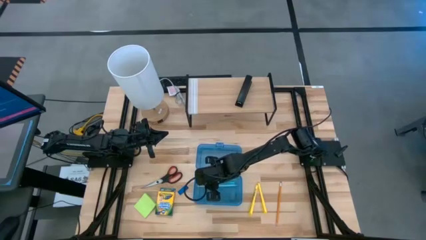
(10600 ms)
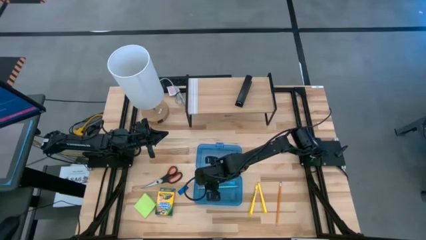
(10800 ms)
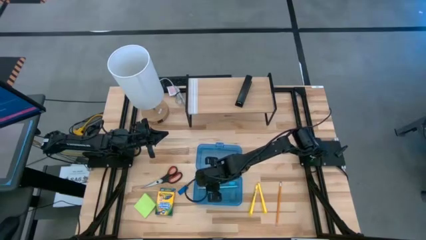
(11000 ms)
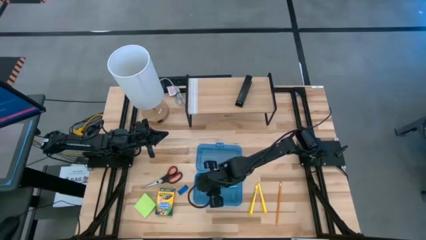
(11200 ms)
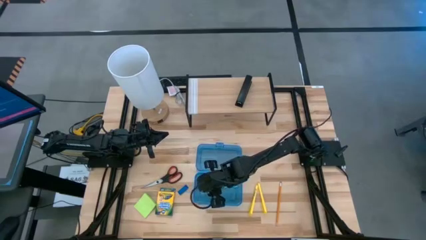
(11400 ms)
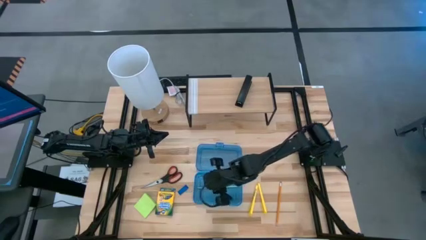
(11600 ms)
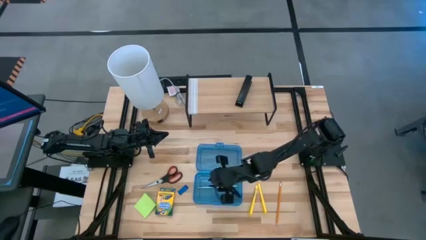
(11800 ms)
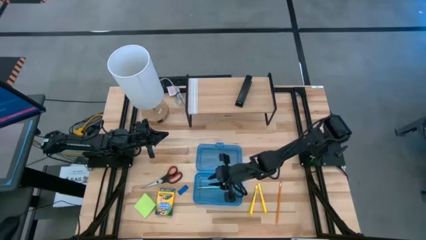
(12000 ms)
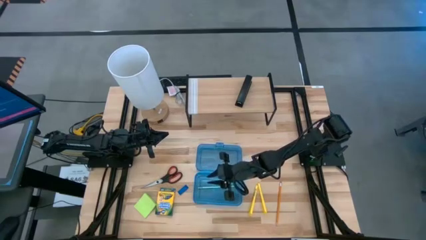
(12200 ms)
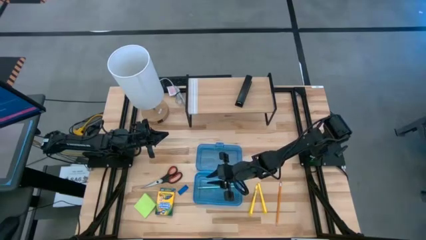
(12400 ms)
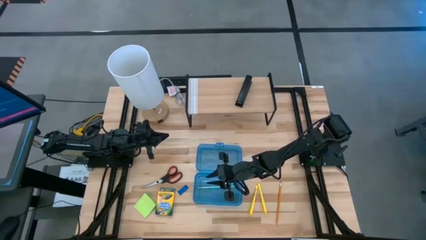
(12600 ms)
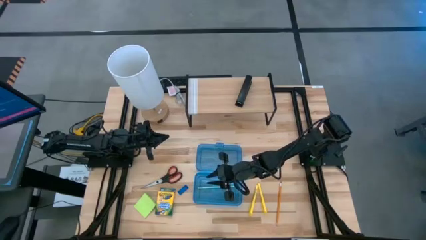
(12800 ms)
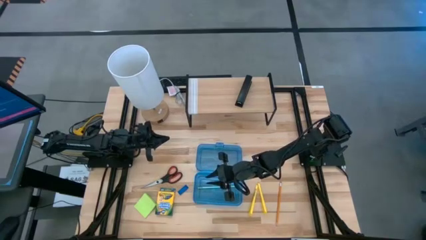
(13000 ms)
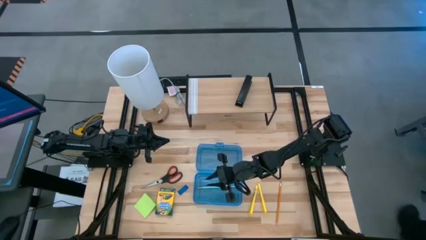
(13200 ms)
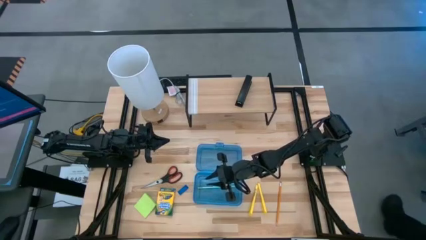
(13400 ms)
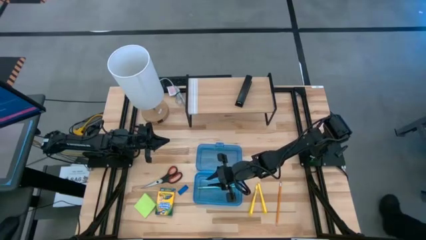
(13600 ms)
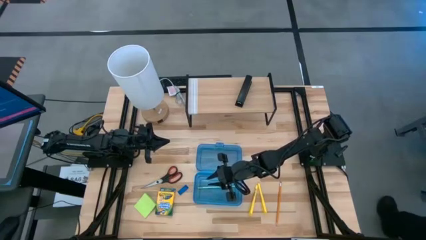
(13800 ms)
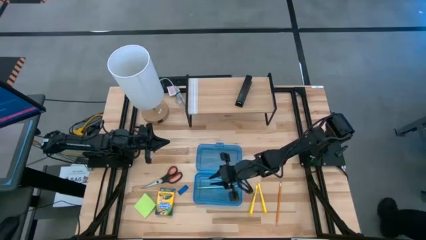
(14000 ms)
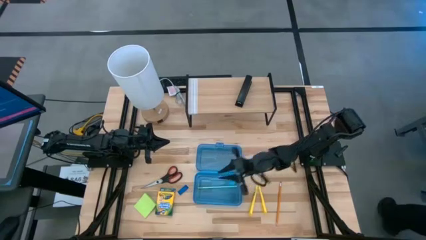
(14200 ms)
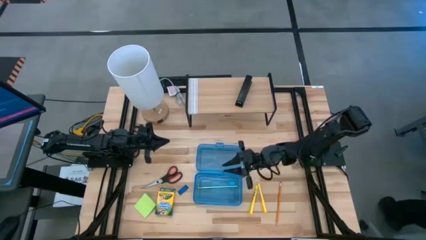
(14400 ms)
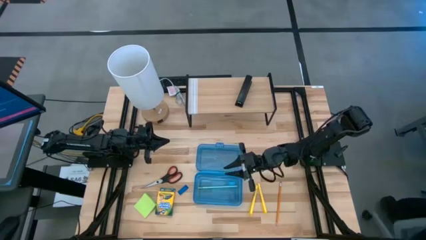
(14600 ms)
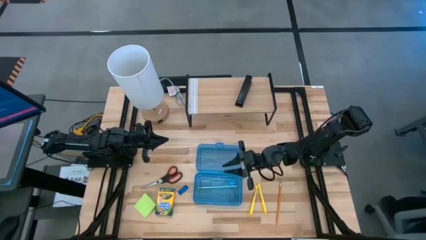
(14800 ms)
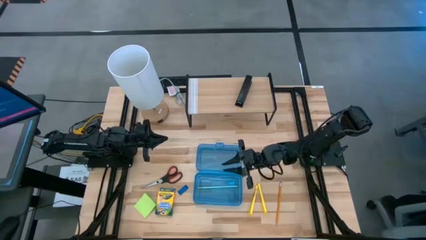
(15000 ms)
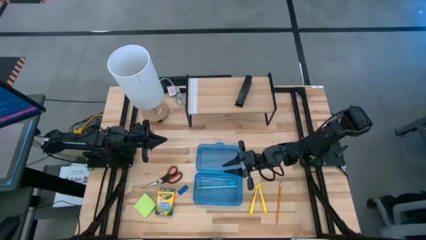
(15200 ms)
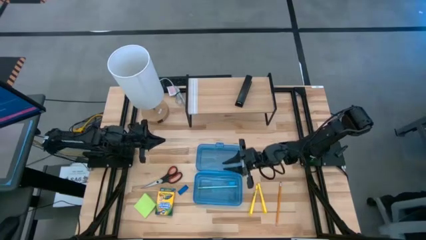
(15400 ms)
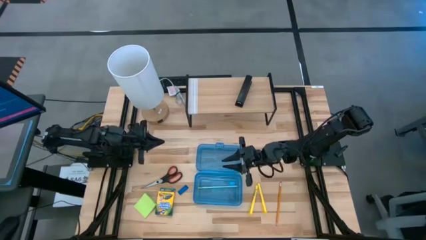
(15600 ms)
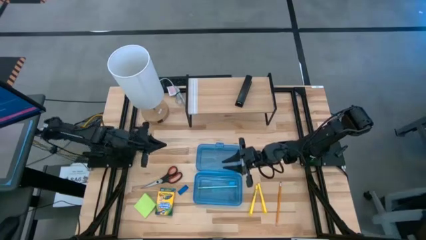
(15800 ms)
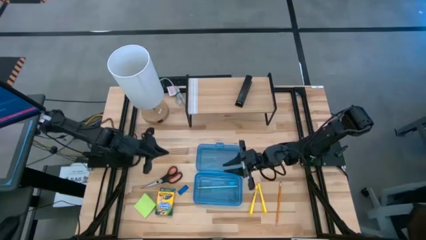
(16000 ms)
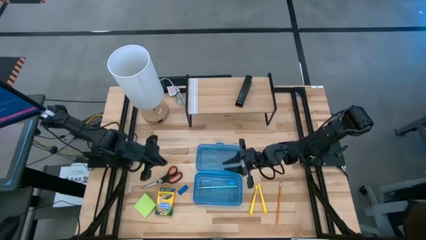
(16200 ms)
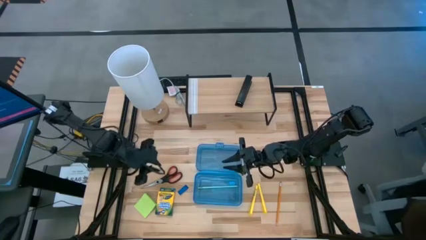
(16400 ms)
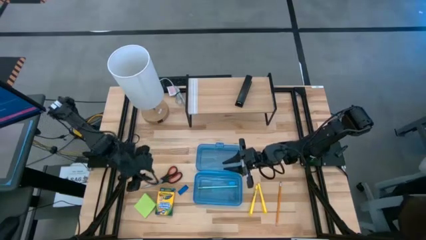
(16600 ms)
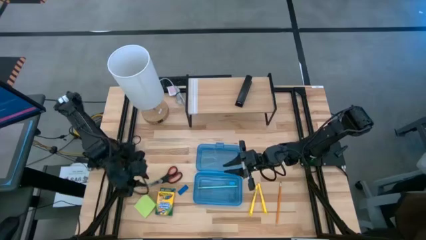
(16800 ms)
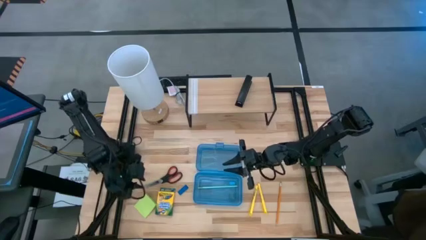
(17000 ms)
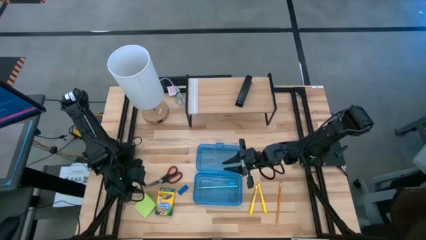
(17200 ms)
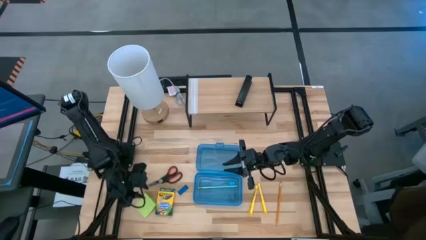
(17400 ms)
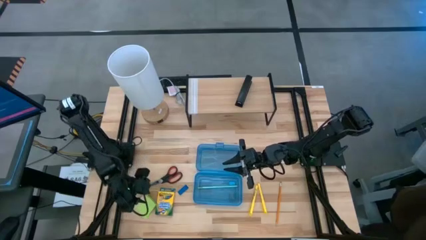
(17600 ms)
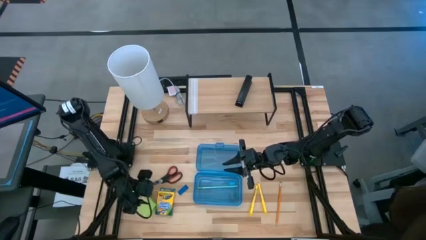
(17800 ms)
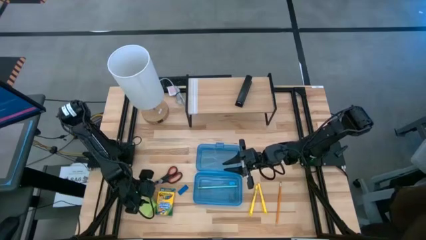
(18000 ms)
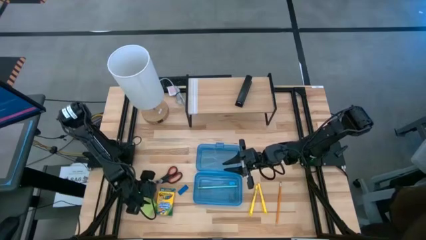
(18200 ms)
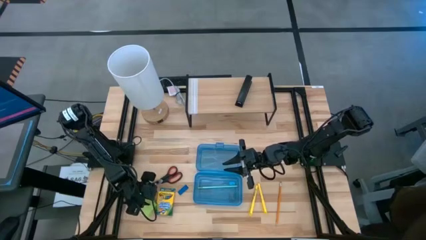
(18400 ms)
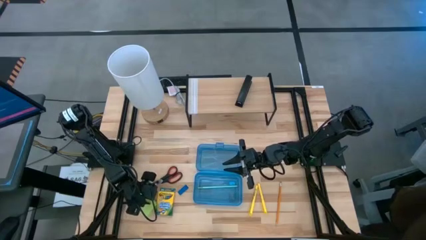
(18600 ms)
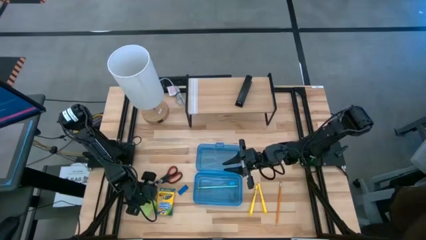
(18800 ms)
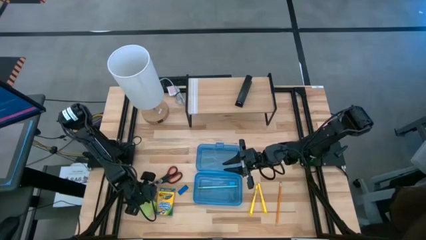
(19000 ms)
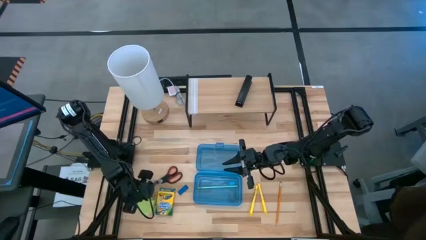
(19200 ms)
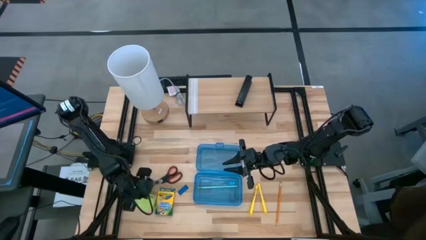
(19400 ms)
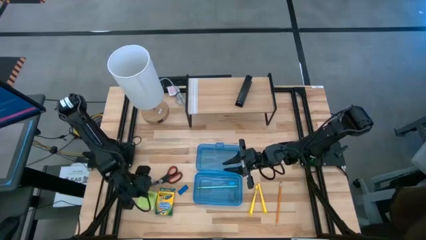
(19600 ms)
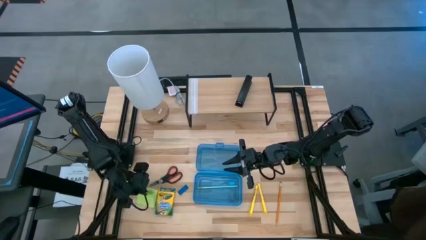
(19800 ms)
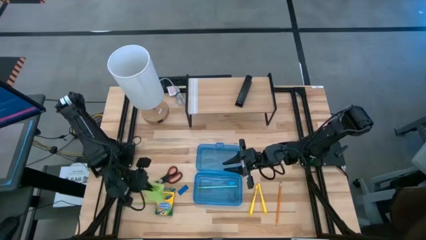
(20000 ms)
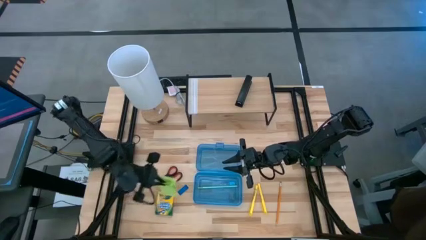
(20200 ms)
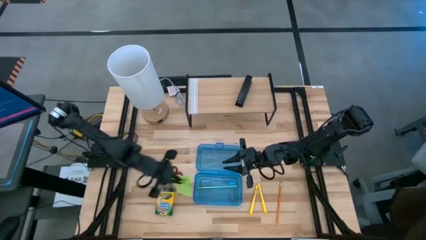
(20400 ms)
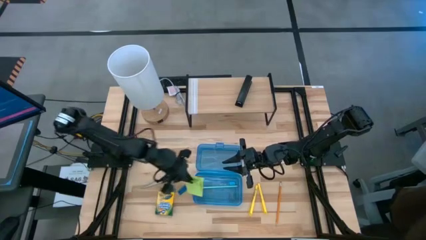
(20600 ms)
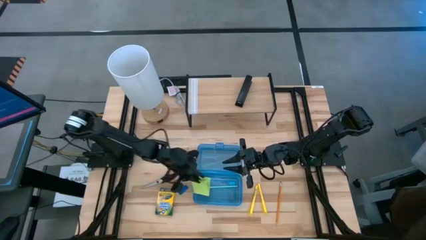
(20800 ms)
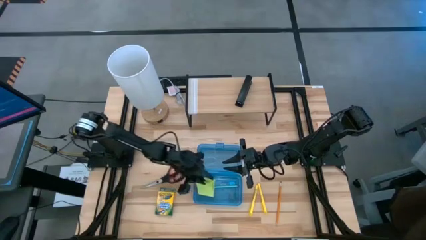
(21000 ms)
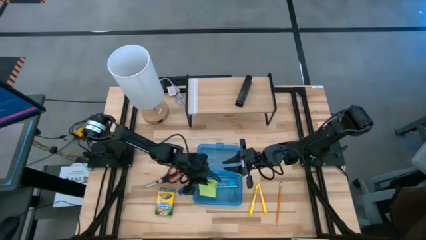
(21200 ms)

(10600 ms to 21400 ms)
Task: Pack school essentials
Put the green sticky notes into the blue supply box

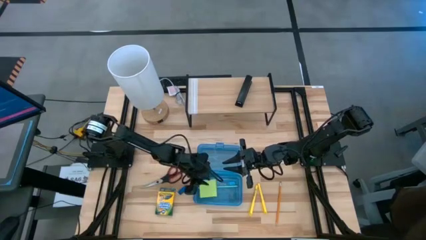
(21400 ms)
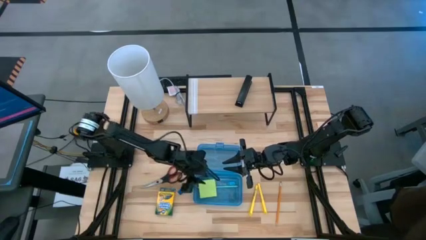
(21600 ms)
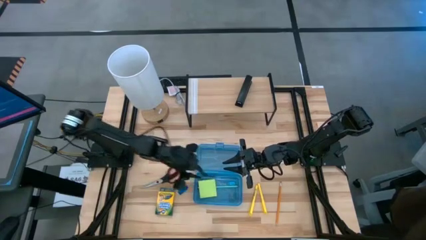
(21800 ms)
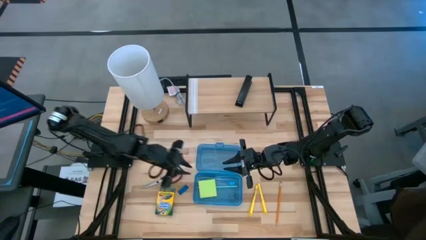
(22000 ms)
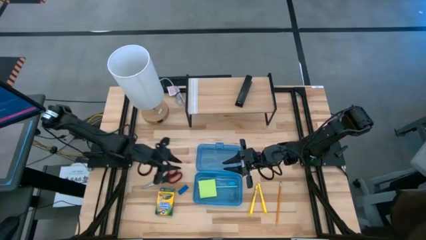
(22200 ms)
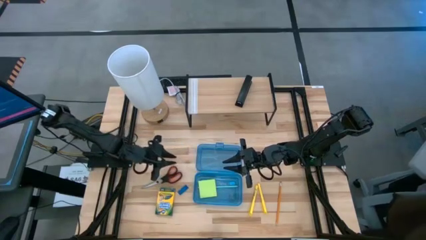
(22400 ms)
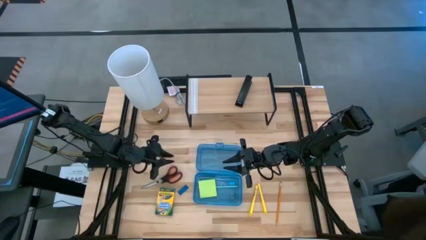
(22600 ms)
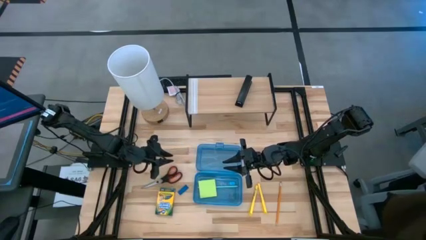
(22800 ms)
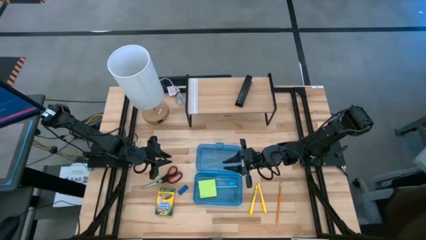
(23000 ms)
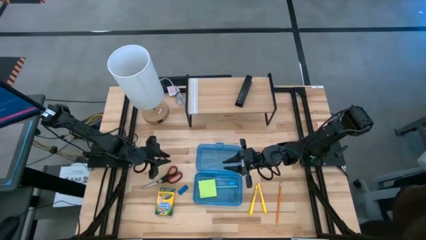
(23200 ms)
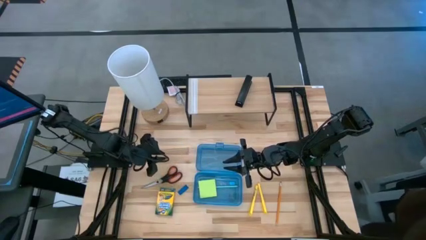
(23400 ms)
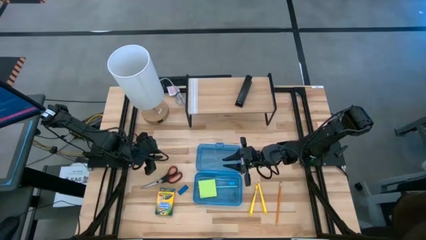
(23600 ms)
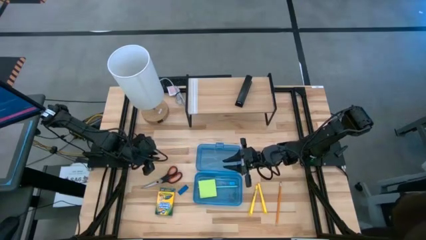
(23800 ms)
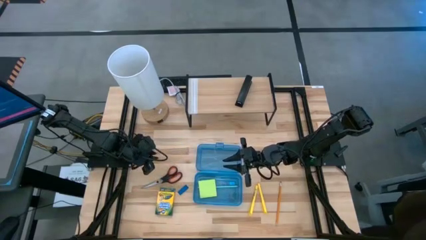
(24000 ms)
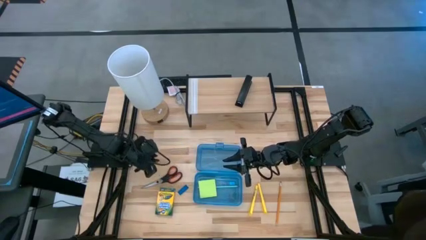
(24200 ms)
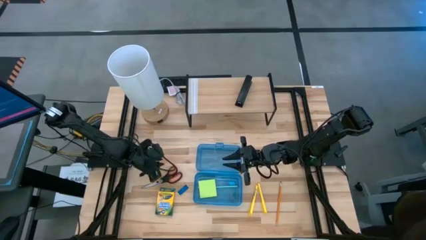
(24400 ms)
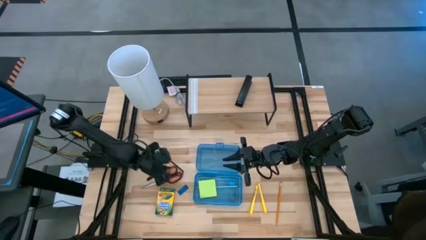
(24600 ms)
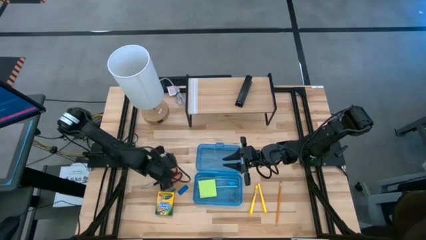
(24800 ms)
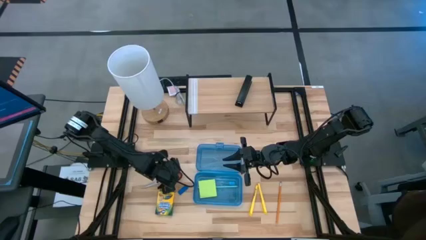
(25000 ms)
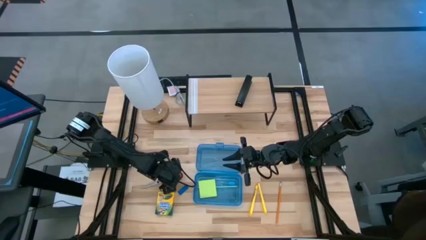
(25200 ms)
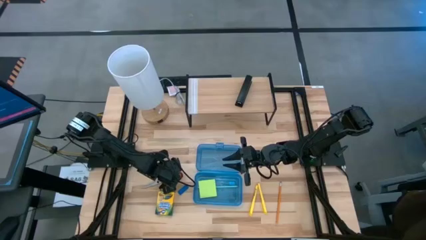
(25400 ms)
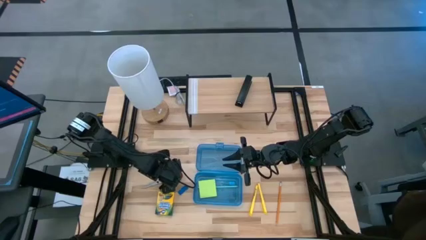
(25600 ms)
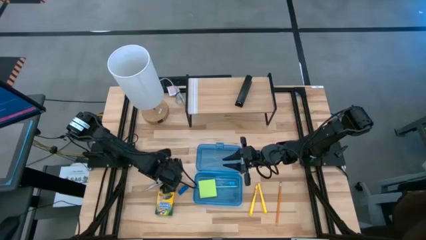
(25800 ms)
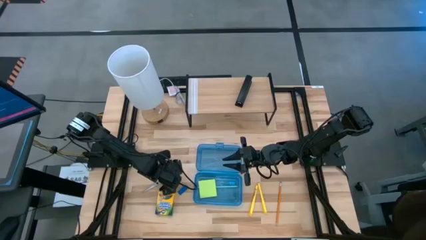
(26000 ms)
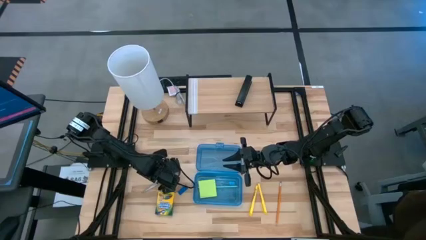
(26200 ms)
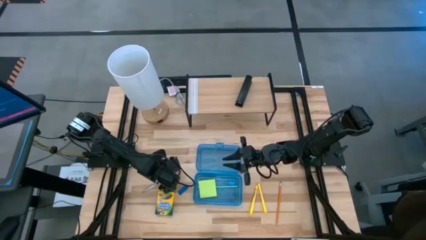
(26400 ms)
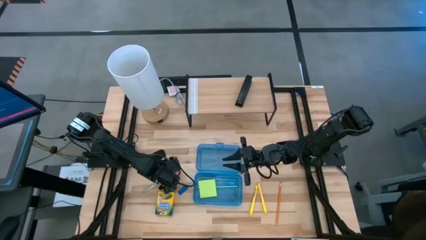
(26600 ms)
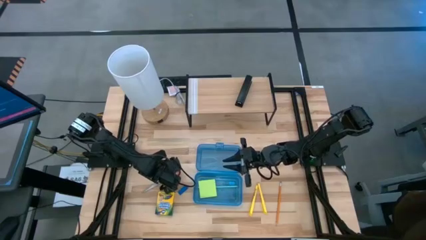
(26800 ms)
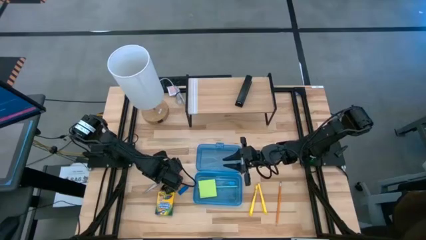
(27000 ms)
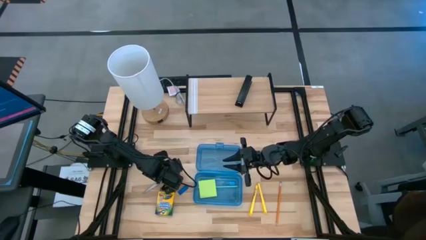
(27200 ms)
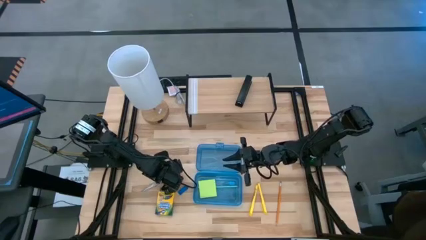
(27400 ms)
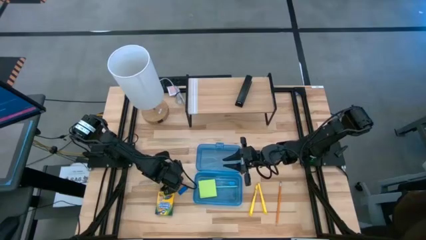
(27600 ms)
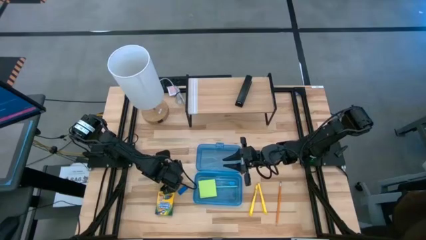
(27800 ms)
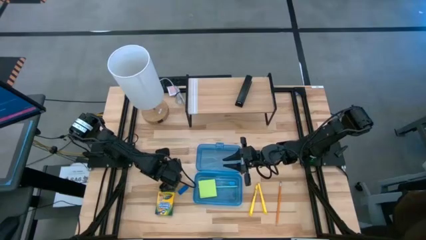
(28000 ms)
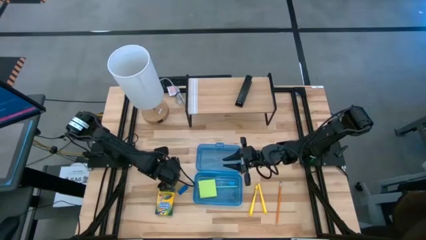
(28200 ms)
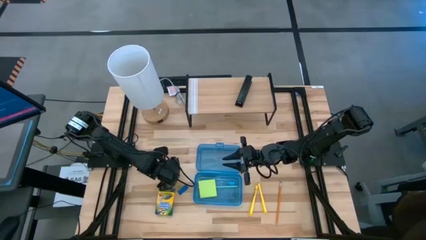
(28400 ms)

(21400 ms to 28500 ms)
Put the black scissors into the blue supply box
